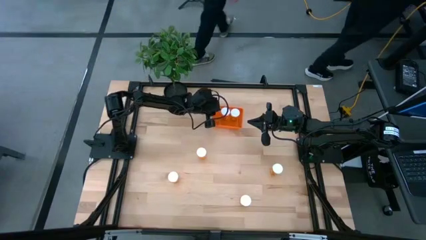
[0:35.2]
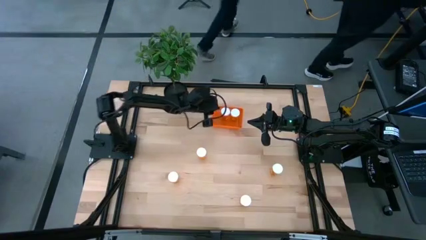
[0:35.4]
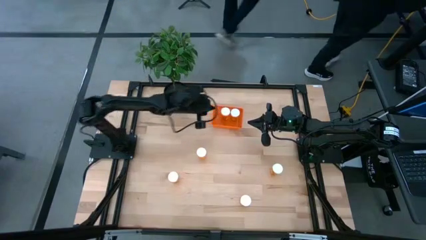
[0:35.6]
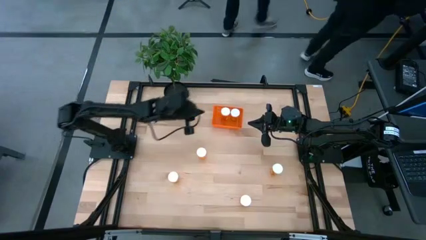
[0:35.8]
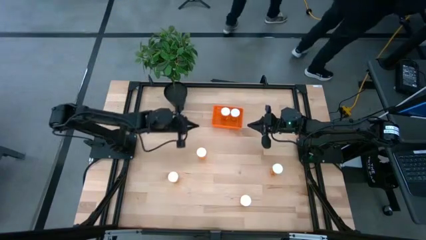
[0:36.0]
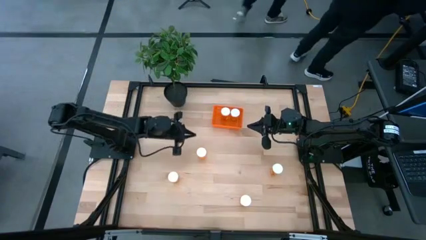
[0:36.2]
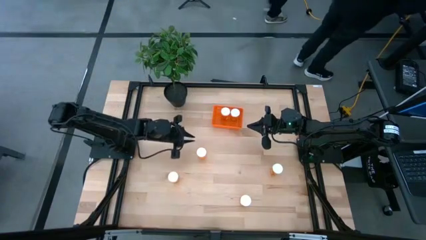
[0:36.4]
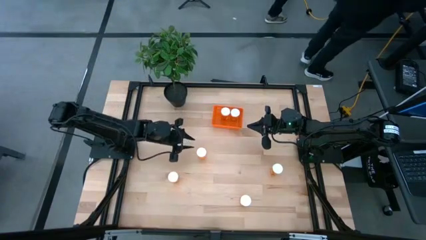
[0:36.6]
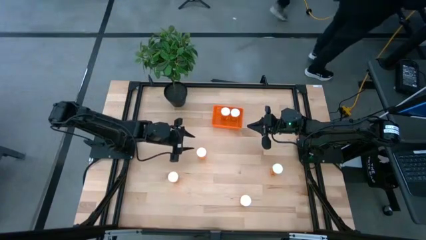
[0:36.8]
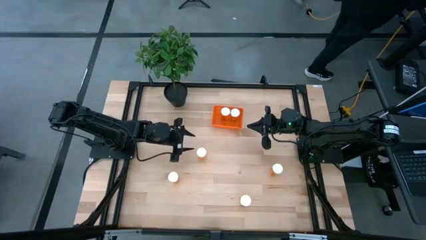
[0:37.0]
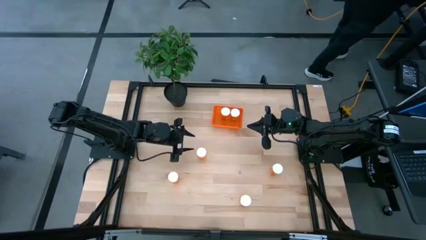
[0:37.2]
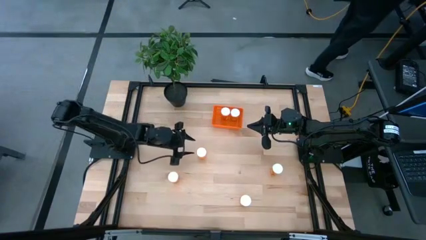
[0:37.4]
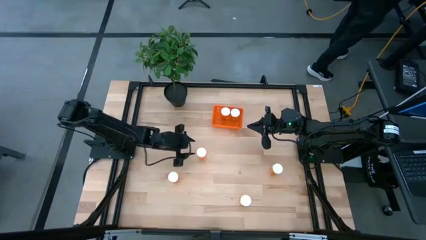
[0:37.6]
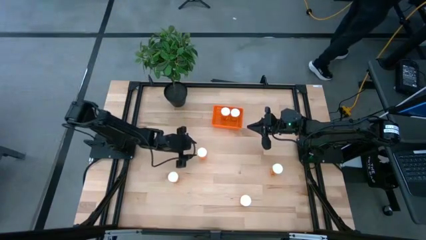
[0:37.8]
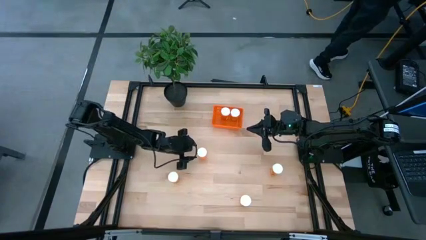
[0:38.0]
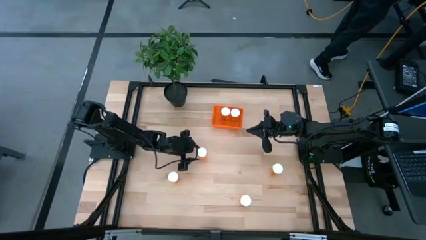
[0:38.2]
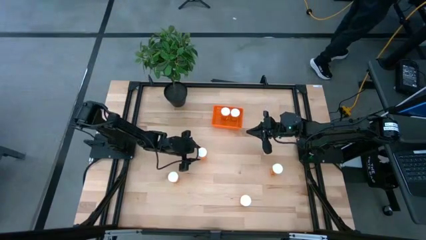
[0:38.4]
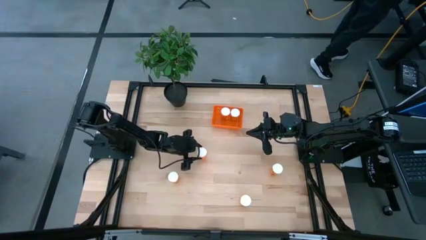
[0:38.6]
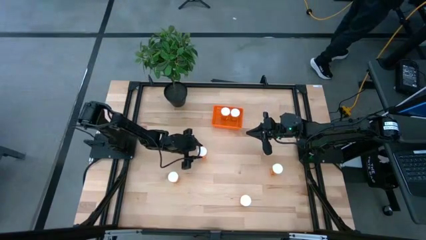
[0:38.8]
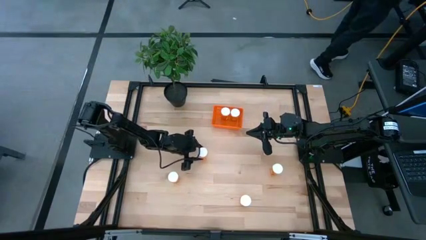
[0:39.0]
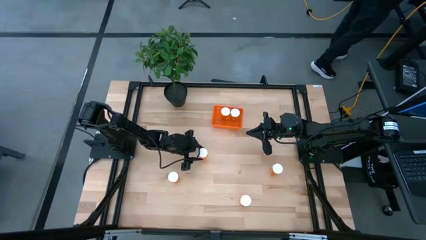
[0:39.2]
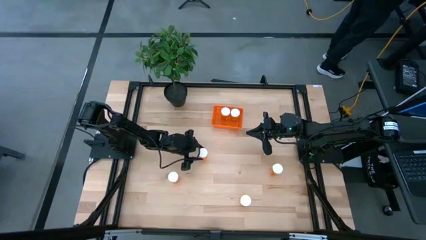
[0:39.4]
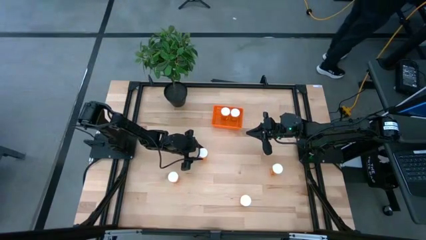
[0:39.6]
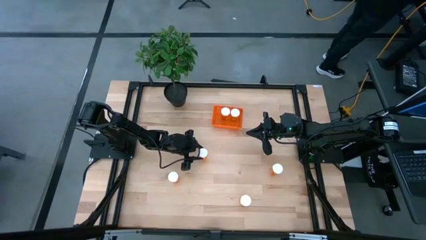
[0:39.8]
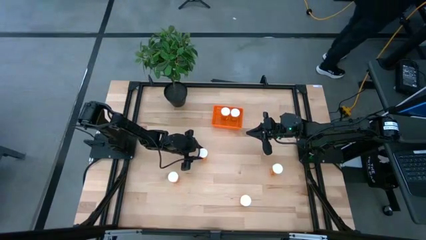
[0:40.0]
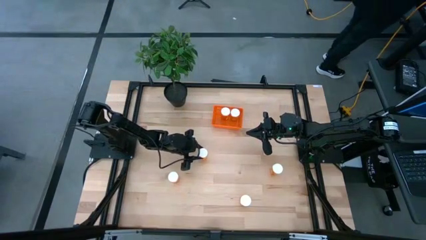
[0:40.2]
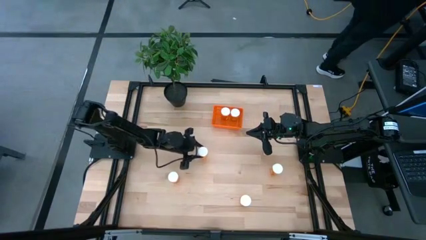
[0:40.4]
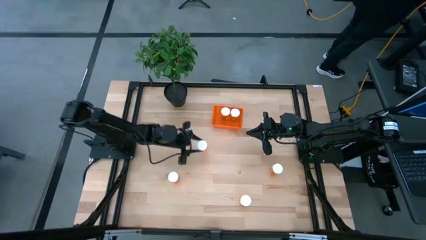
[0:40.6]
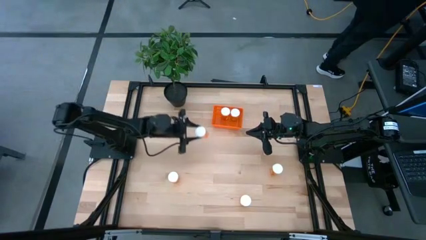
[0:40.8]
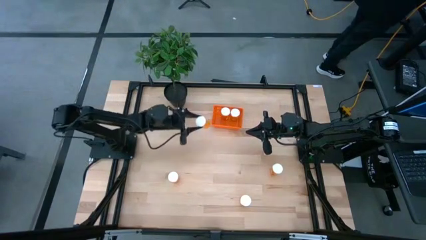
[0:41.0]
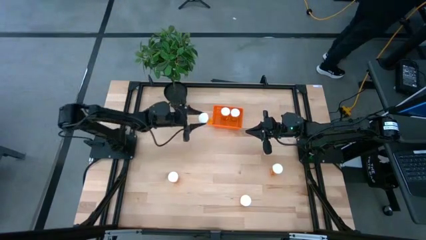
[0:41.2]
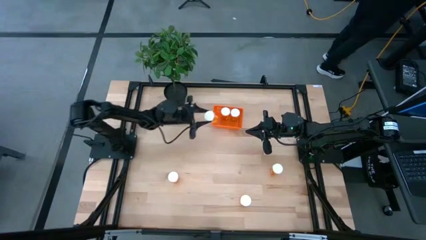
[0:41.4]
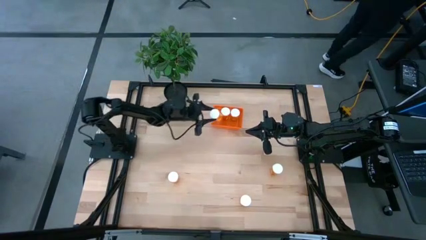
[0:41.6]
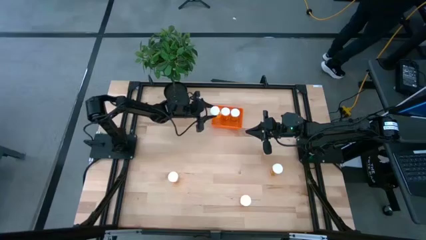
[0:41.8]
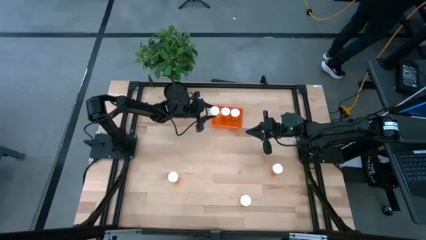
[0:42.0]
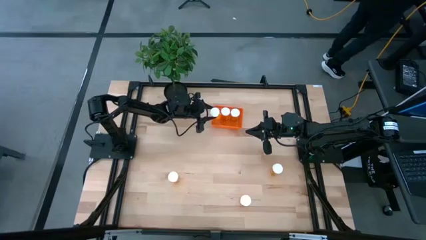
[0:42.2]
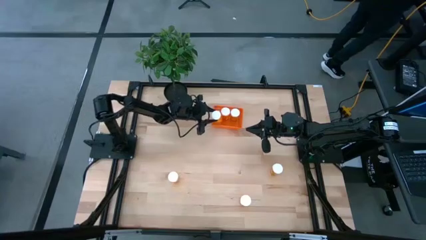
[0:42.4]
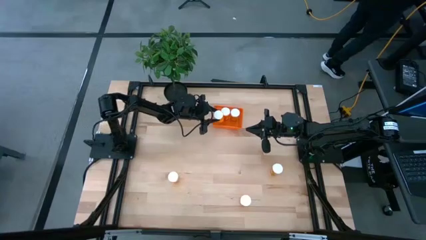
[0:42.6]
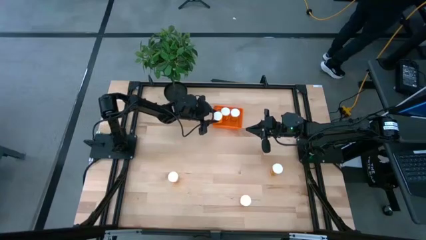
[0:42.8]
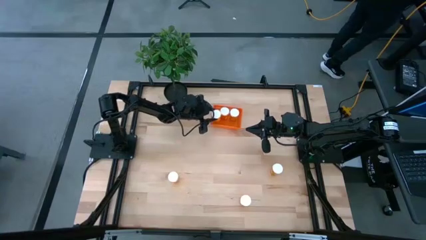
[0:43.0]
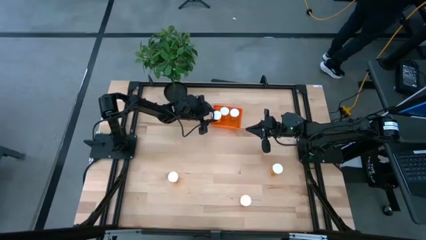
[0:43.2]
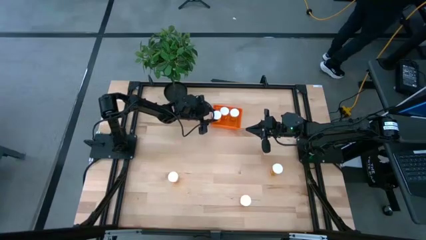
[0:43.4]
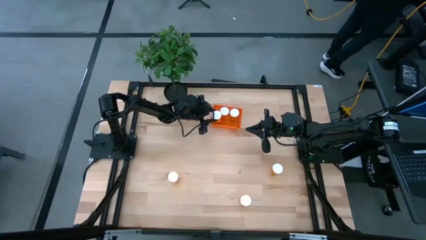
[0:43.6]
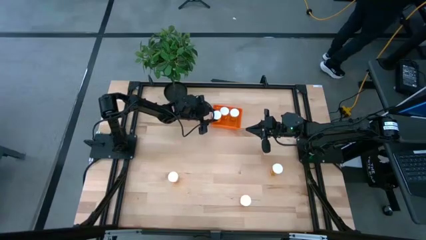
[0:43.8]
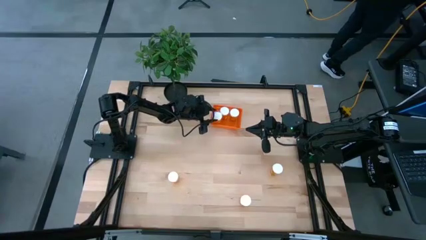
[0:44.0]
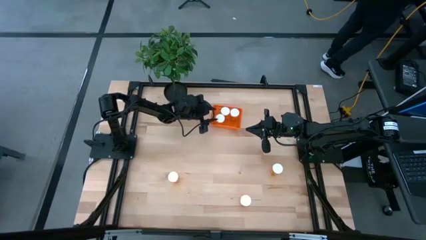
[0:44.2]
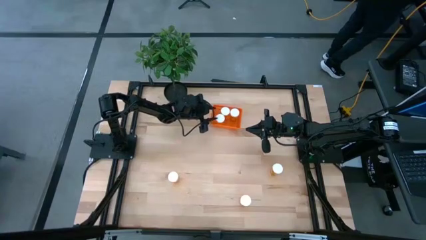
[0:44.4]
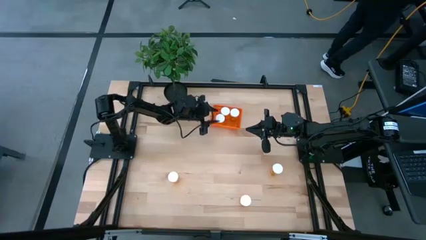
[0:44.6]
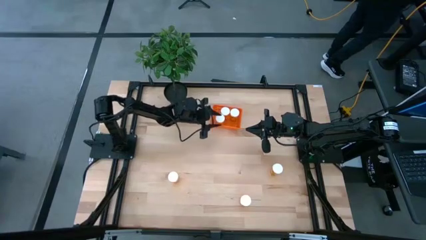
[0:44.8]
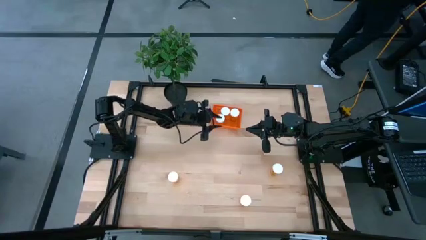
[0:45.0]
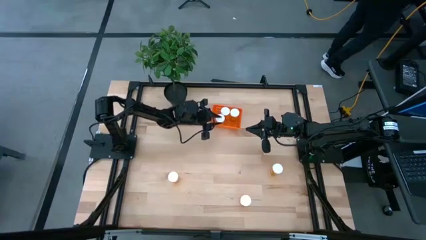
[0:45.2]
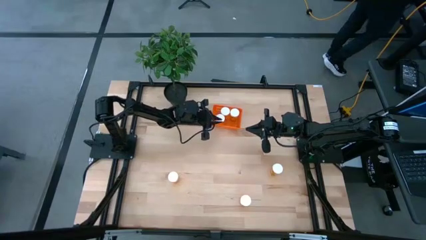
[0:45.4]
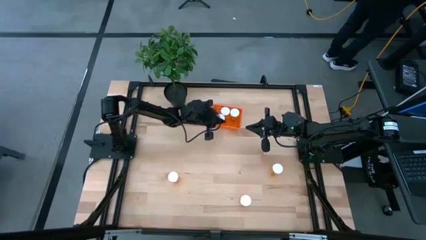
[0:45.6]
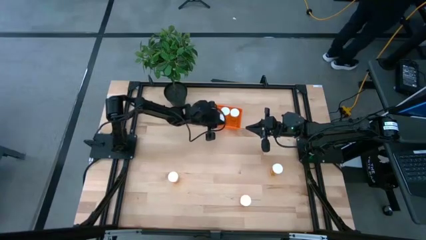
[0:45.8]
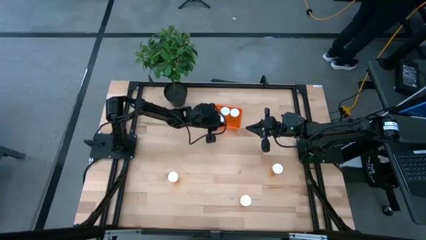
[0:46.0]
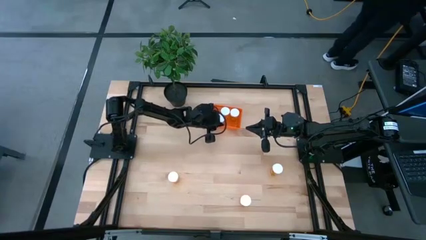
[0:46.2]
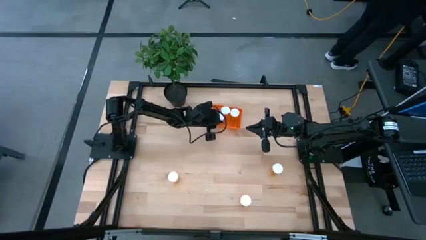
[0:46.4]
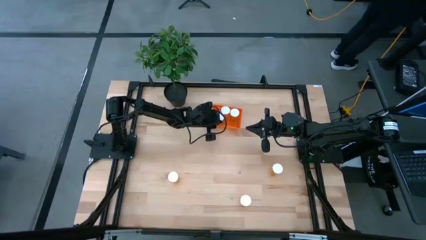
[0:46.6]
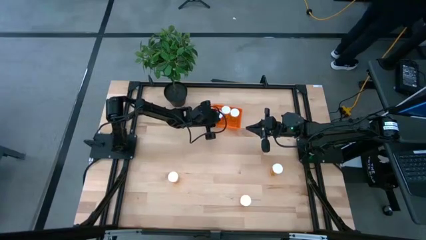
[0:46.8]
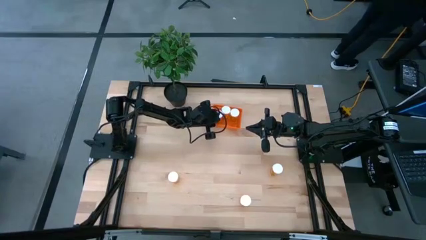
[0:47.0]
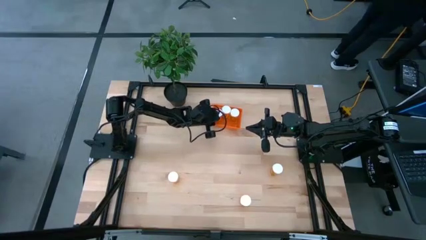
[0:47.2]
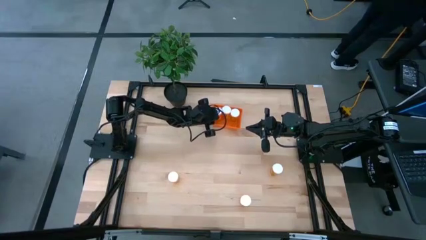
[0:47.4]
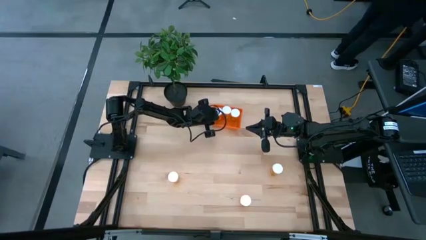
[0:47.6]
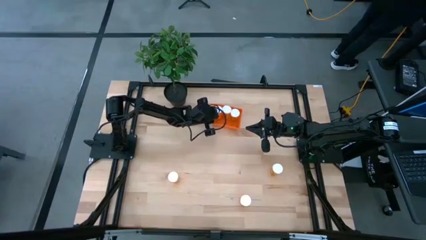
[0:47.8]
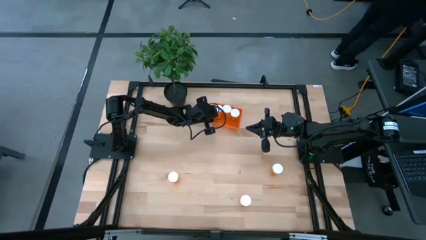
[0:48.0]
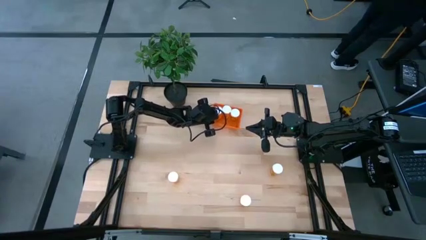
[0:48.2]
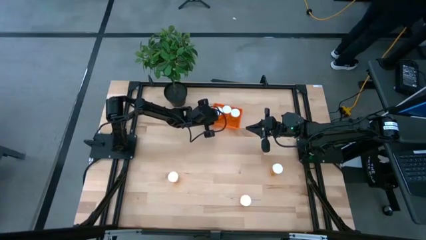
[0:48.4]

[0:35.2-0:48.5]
Task: Pick and place pill bottles into a basket
Put the orange pill bottle into the orange bin
